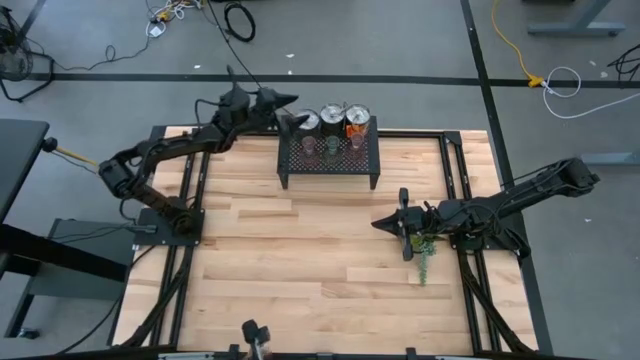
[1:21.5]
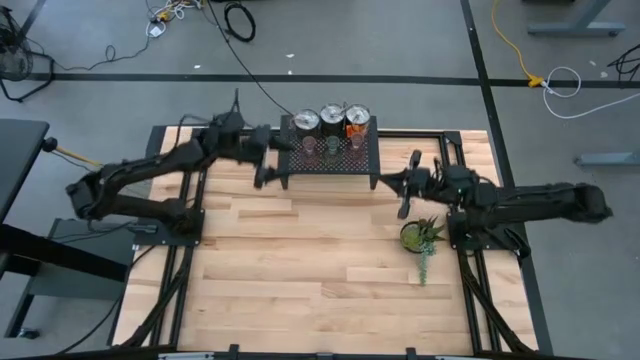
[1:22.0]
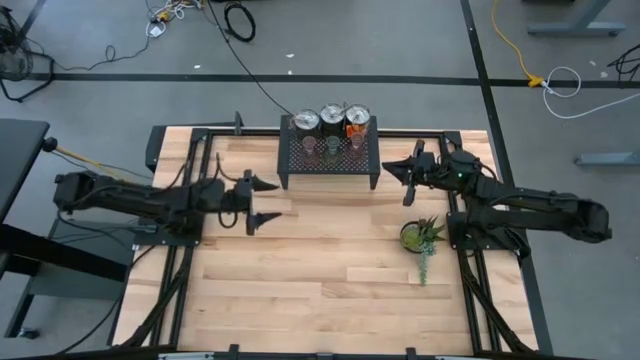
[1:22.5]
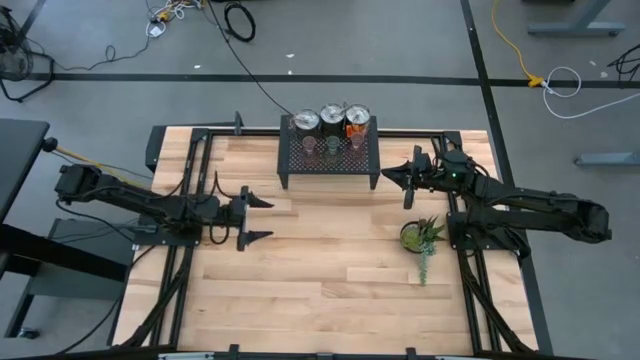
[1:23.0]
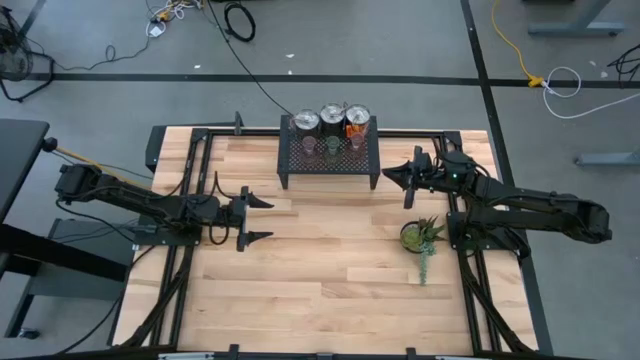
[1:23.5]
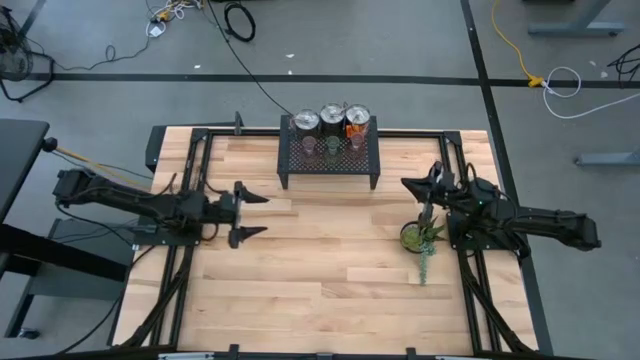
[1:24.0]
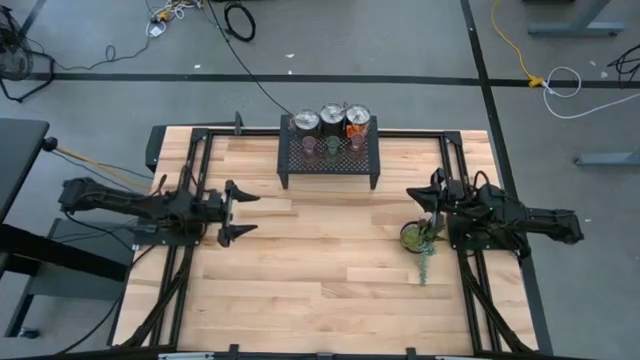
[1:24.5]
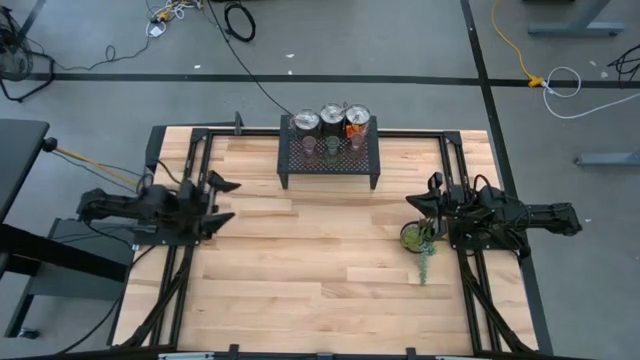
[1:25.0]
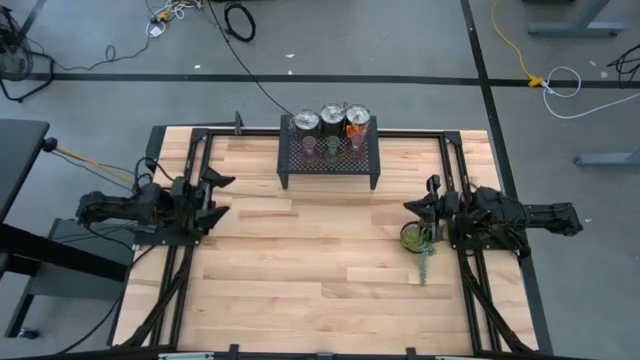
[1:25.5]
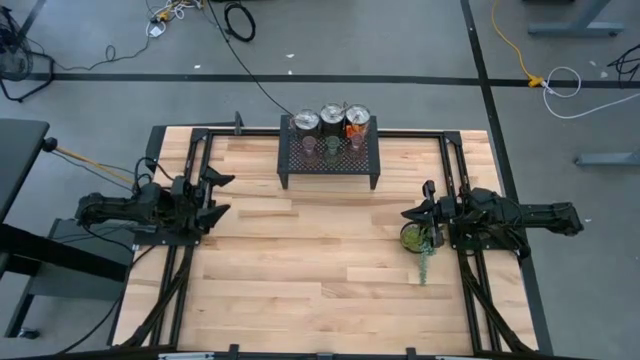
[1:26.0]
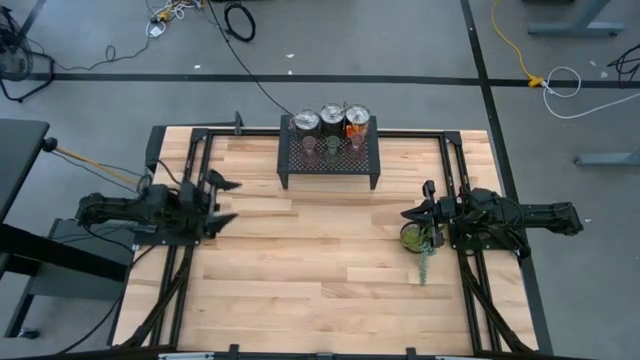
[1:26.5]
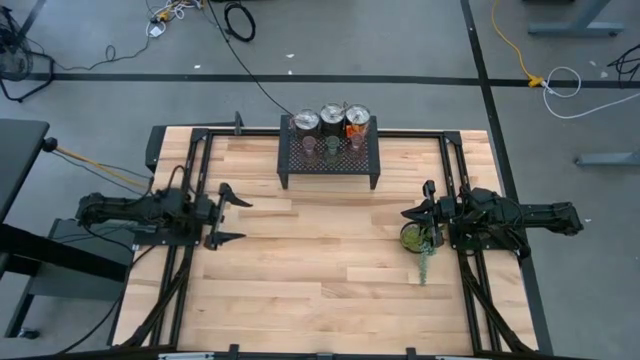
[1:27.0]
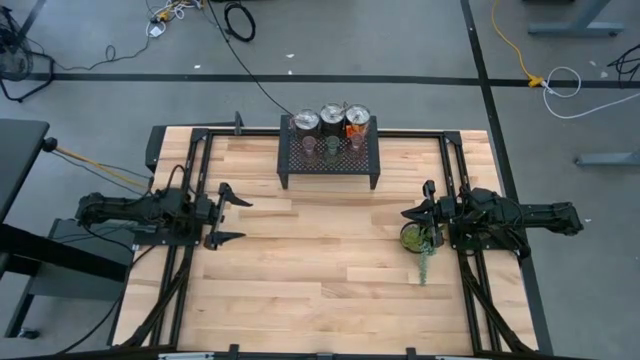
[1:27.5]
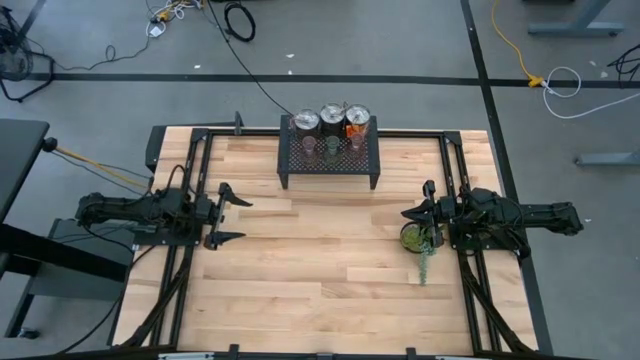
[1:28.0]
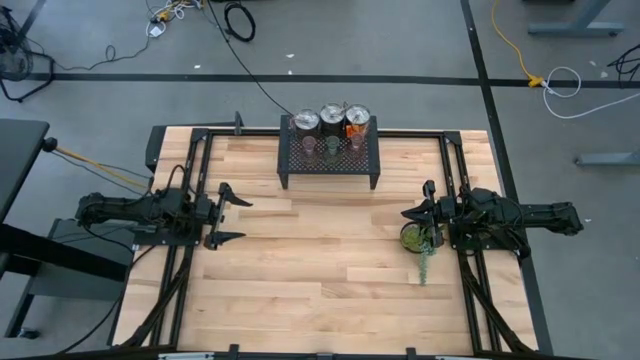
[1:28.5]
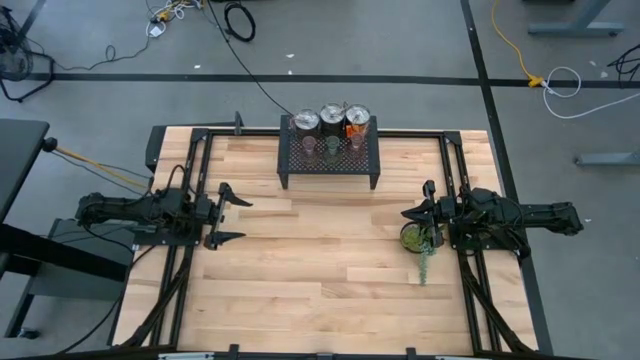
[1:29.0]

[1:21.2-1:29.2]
Task: Pick & Place candle stick holders
Return to Home Position

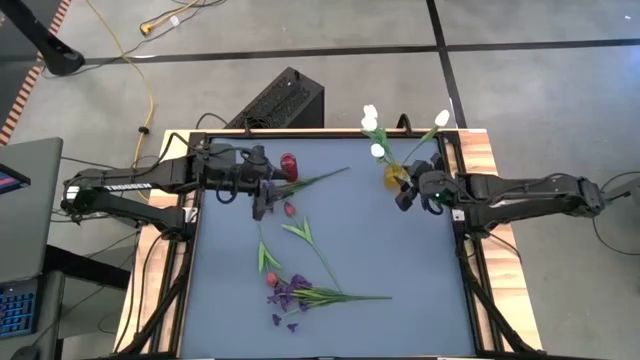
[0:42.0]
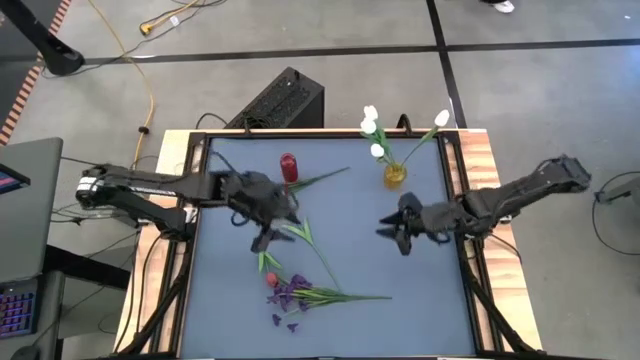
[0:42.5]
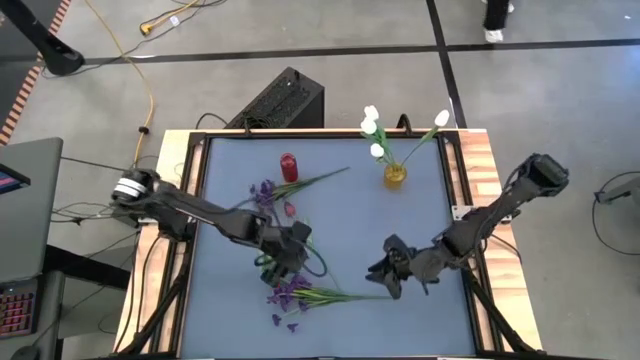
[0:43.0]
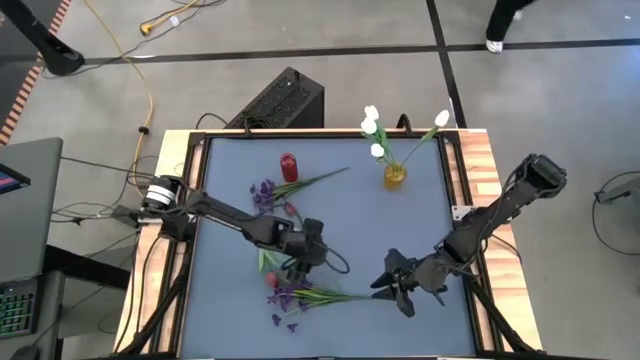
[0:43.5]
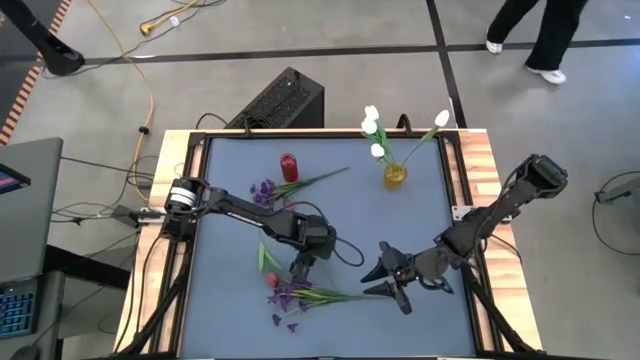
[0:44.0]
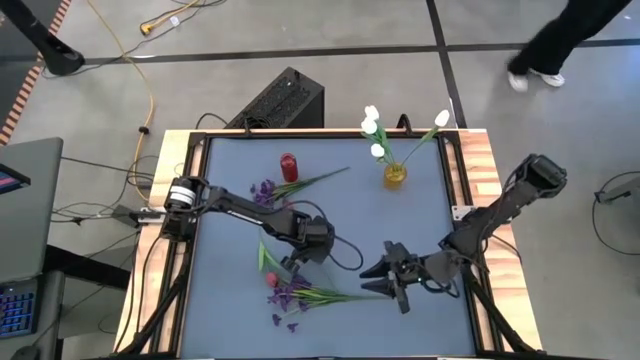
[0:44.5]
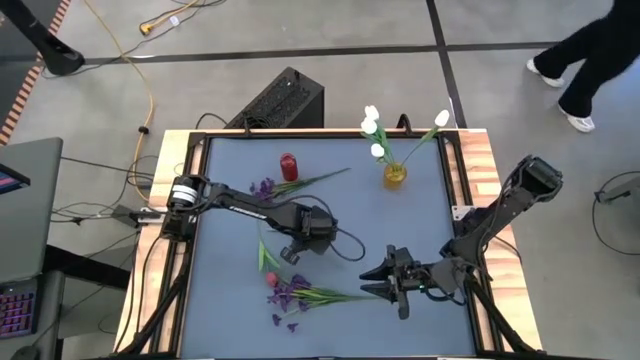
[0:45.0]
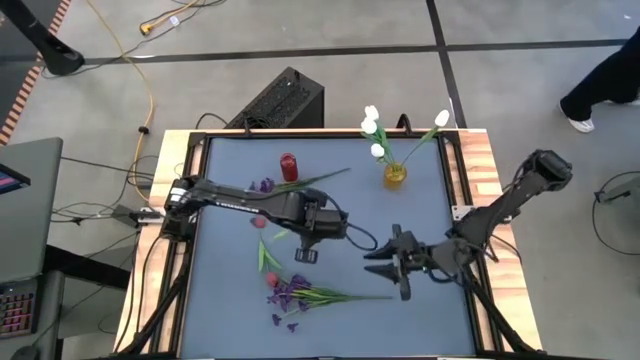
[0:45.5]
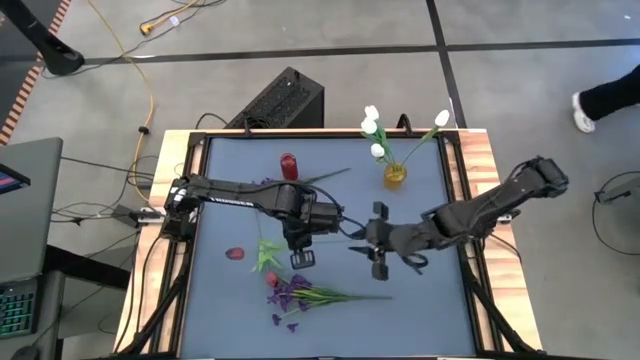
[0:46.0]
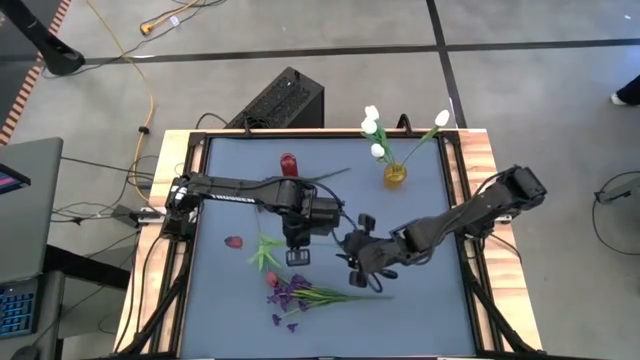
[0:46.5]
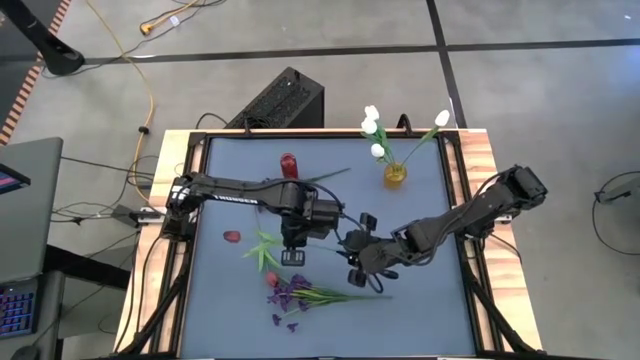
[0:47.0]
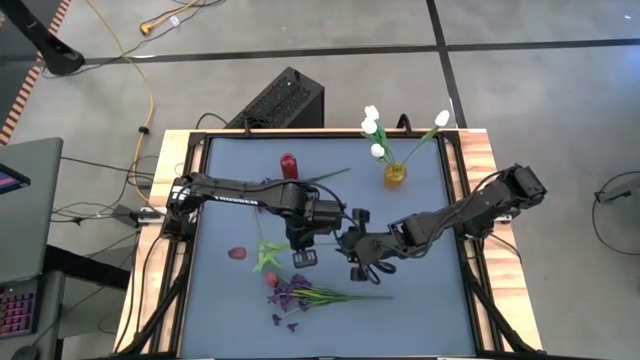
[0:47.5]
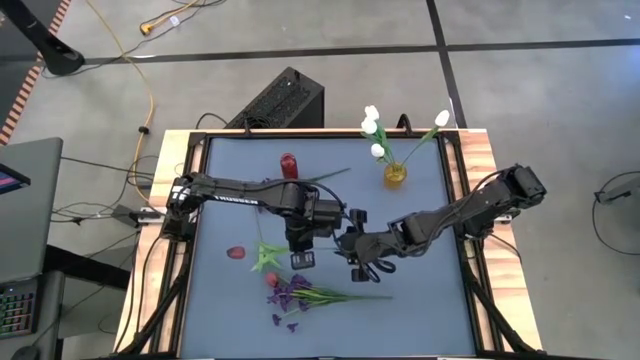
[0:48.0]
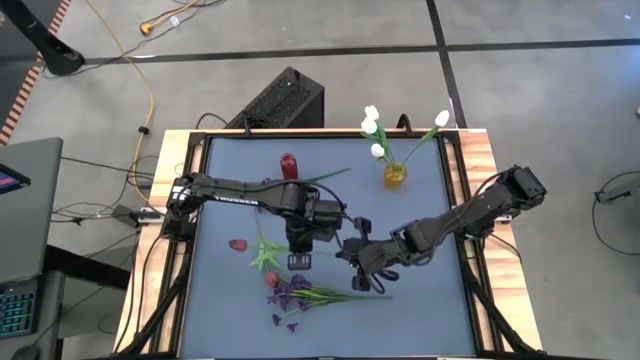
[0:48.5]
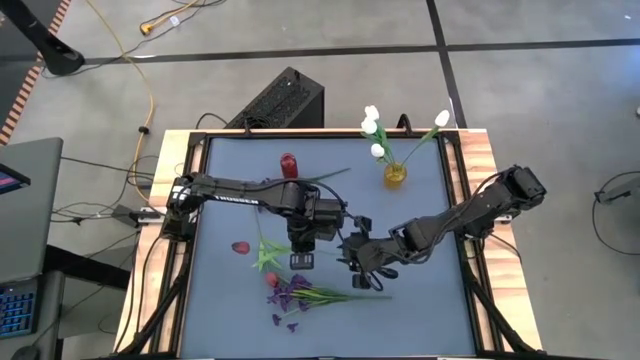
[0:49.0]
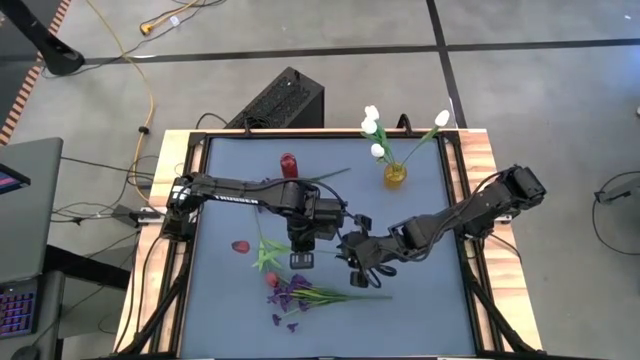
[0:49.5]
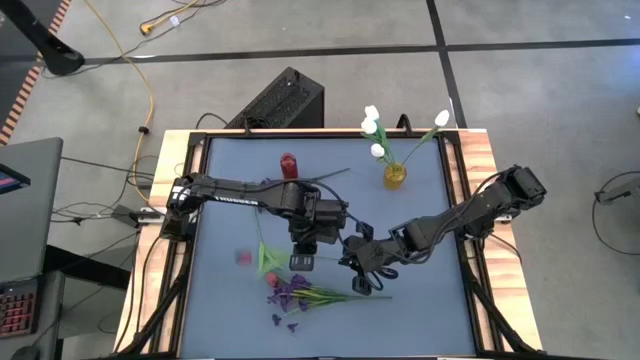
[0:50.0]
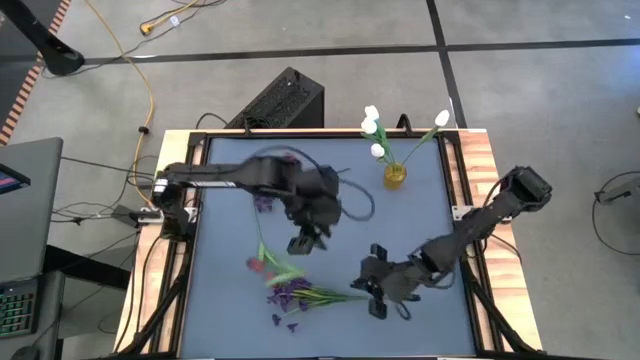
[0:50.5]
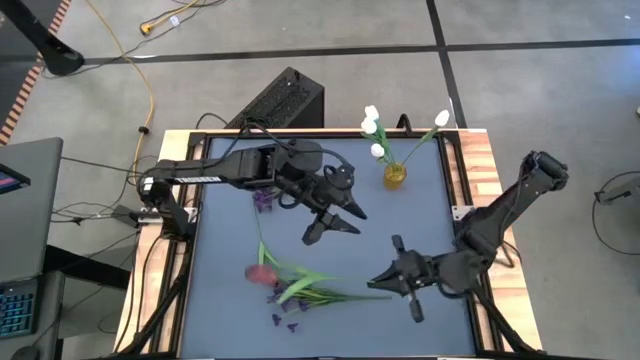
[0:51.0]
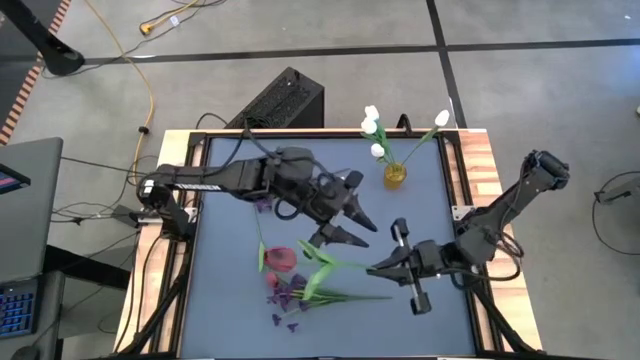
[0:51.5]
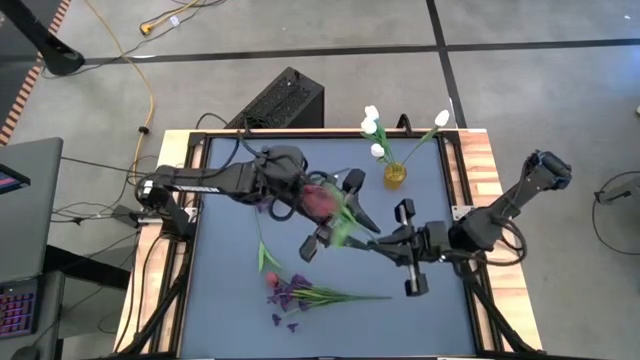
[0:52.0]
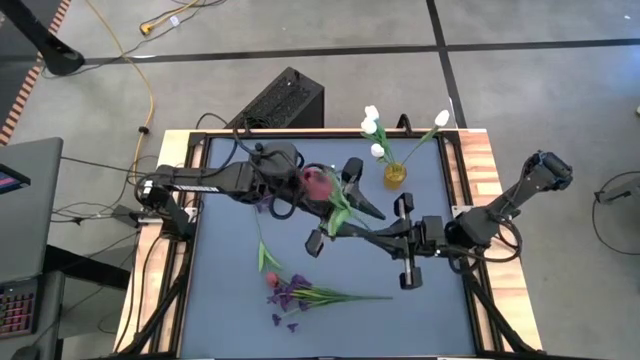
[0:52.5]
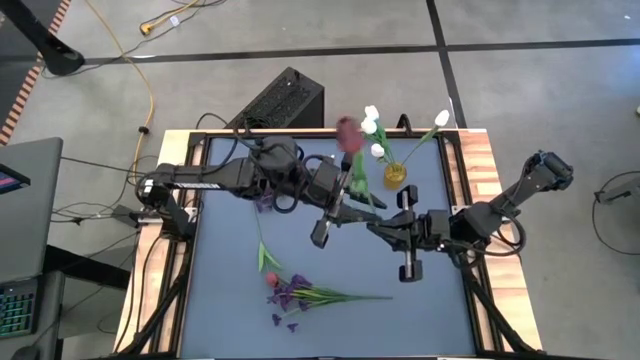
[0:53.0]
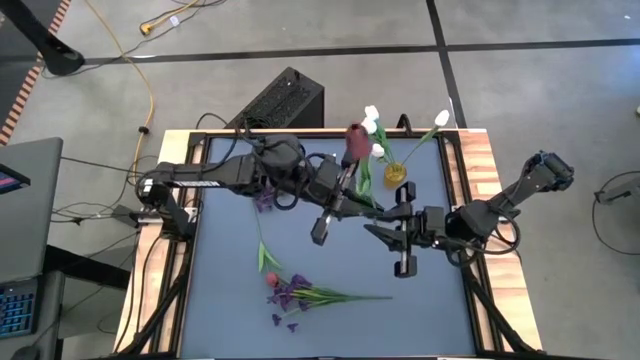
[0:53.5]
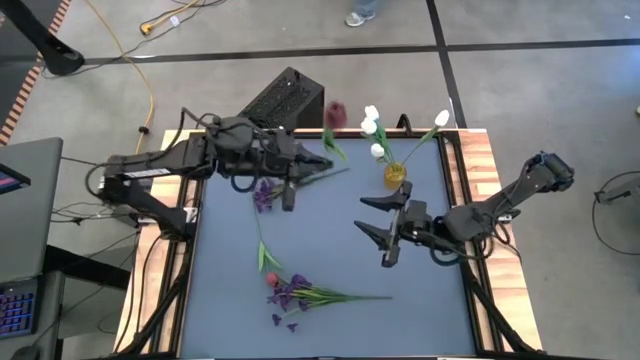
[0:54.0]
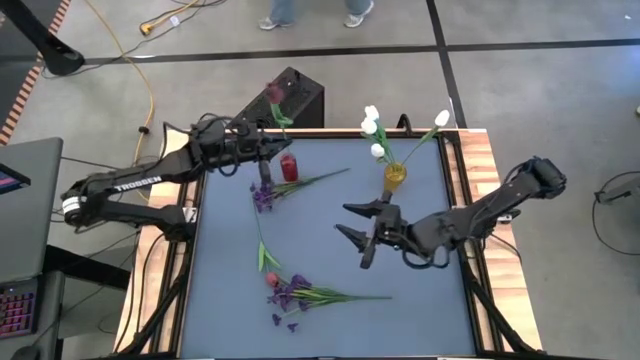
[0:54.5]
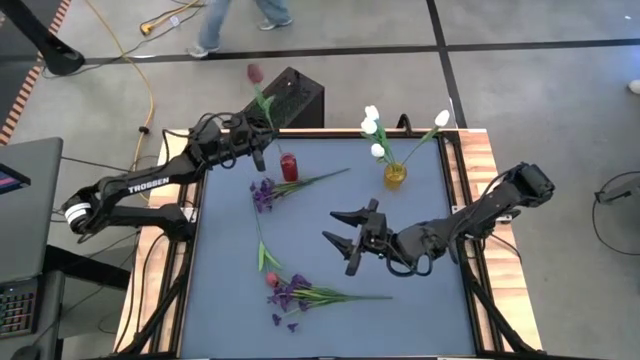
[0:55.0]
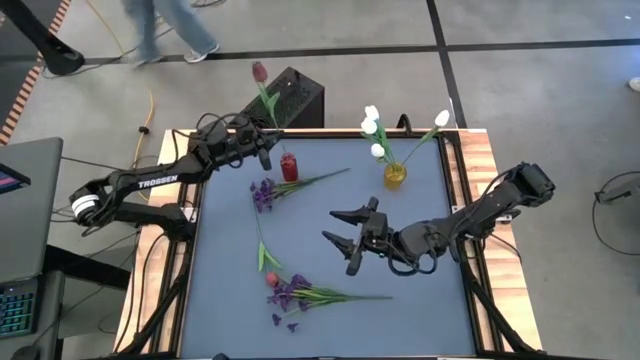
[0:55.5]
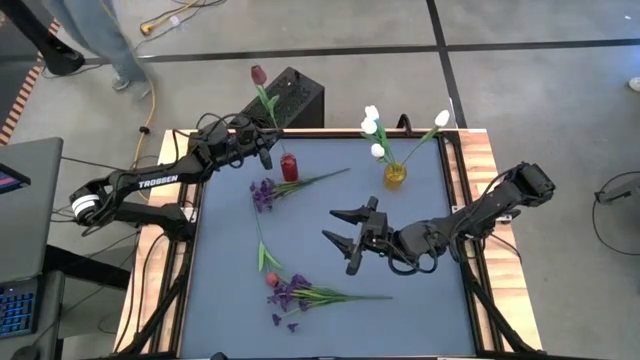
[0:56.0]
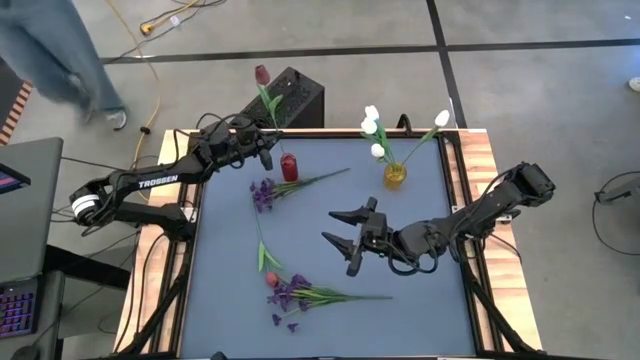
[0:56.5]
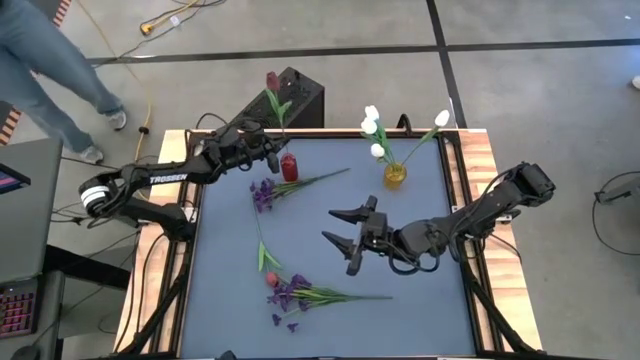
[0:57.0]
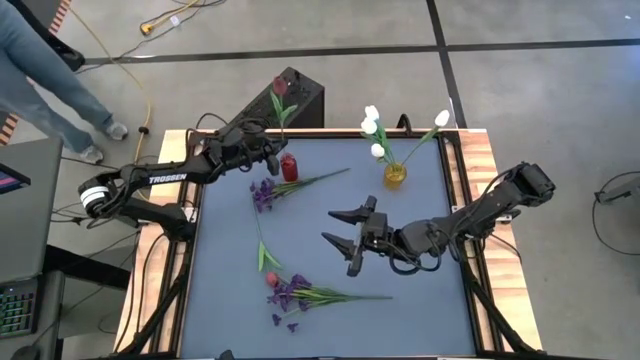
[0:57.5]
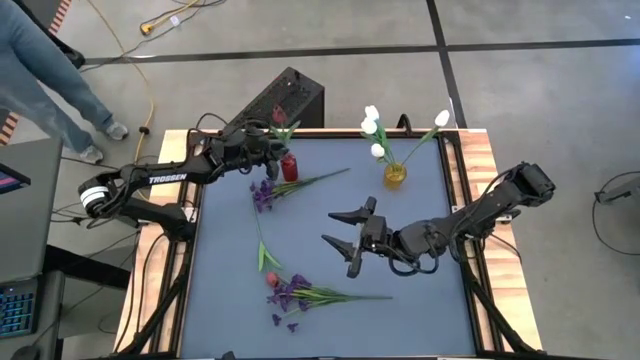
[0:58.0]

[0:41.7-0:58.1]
Task: Sort flowers into vase by color
Put the red flower into the red vase
